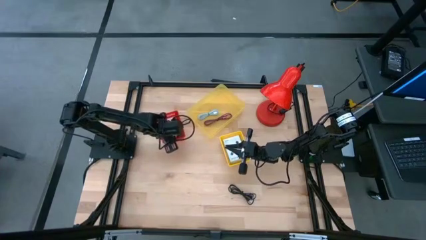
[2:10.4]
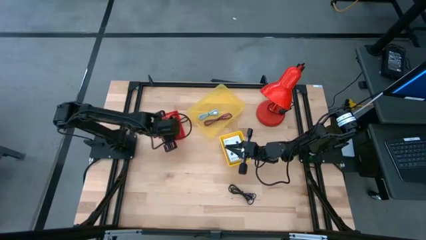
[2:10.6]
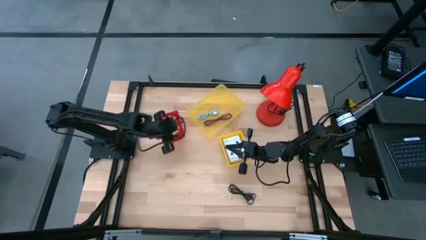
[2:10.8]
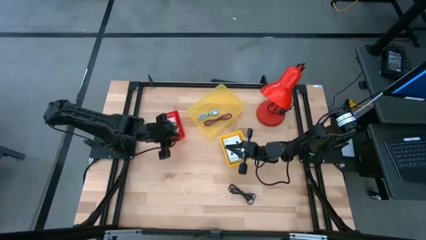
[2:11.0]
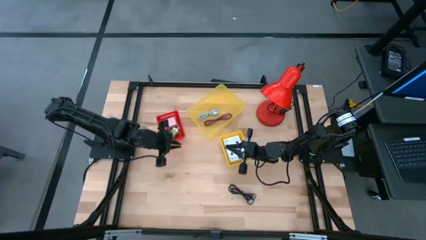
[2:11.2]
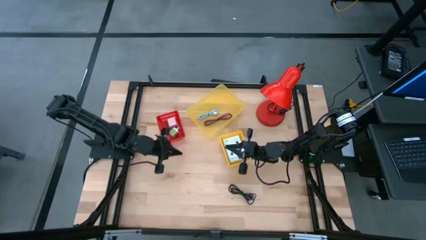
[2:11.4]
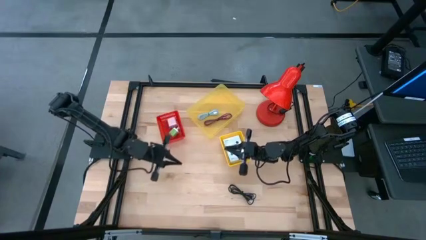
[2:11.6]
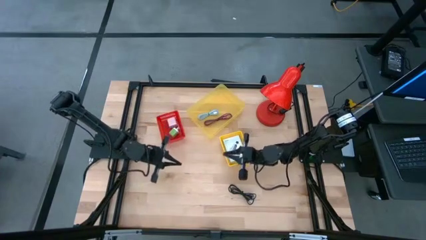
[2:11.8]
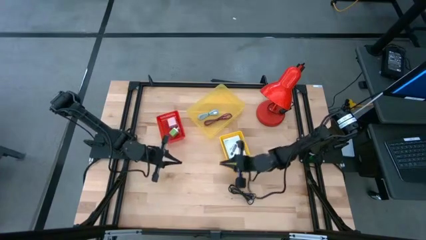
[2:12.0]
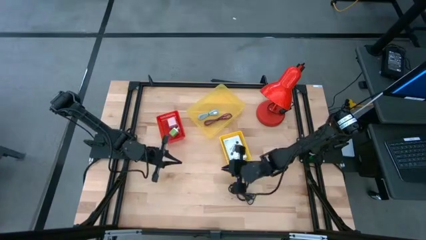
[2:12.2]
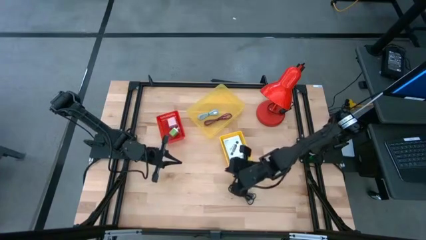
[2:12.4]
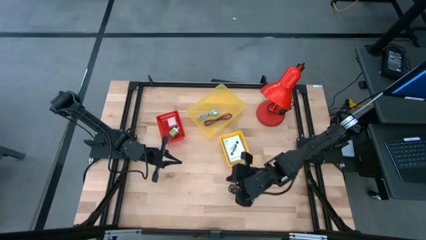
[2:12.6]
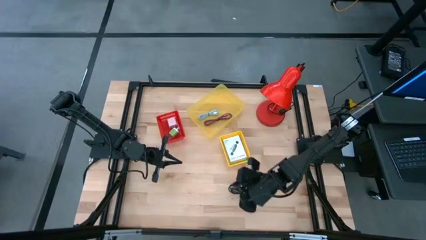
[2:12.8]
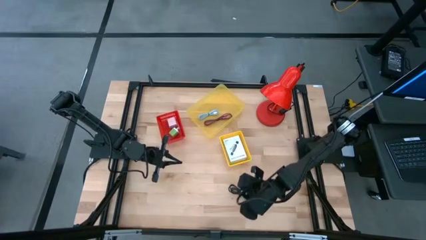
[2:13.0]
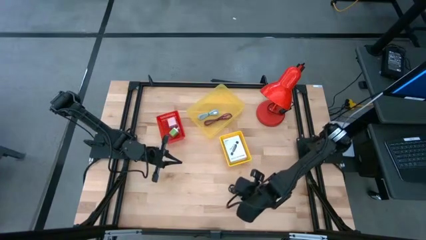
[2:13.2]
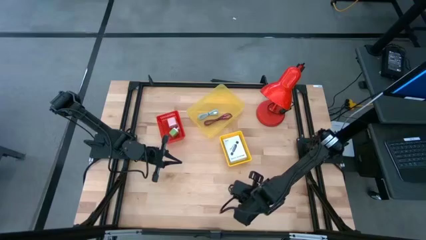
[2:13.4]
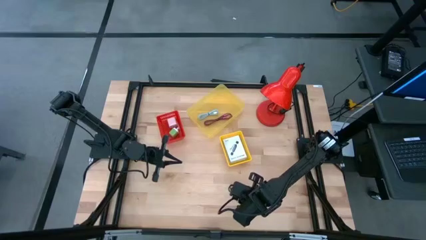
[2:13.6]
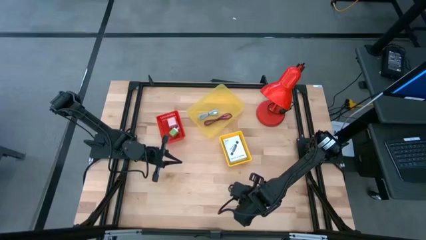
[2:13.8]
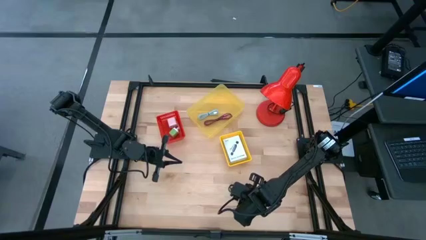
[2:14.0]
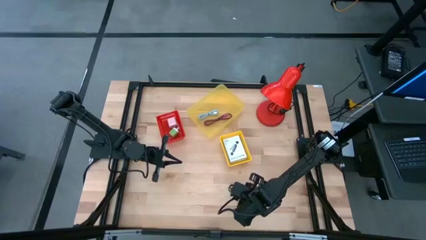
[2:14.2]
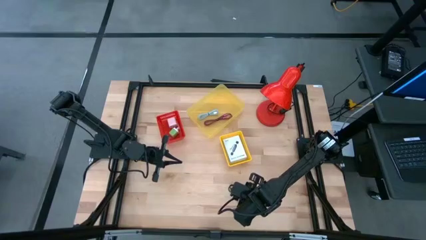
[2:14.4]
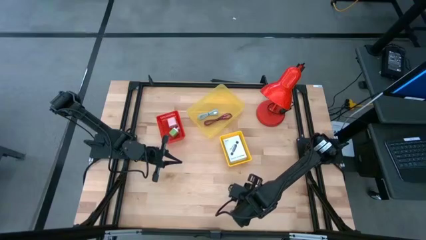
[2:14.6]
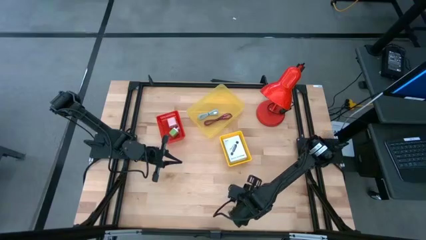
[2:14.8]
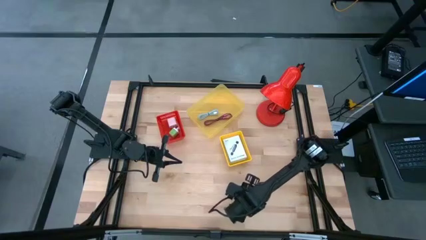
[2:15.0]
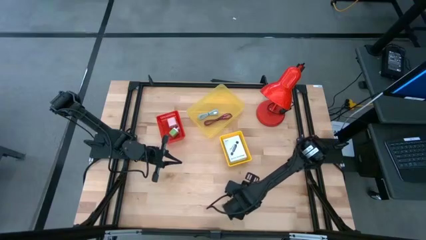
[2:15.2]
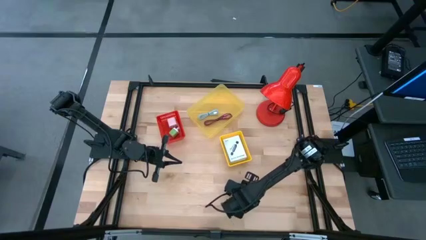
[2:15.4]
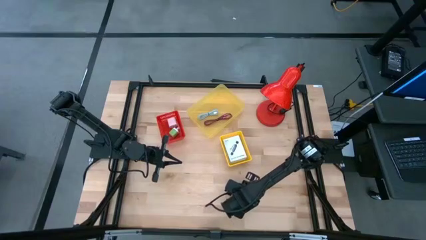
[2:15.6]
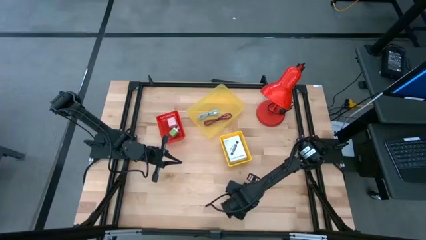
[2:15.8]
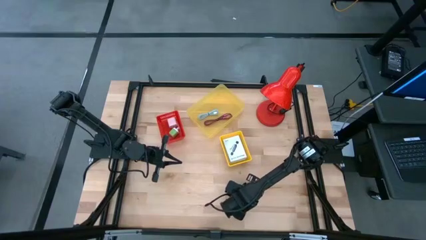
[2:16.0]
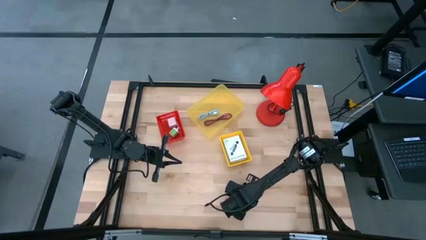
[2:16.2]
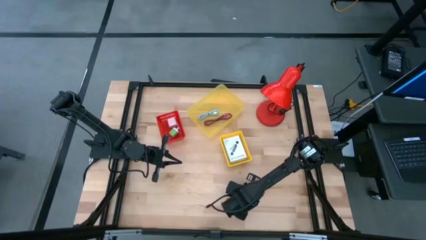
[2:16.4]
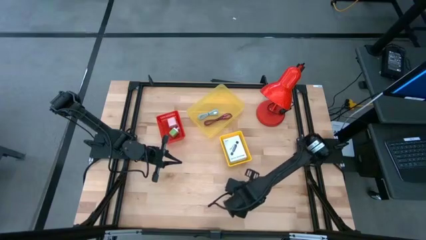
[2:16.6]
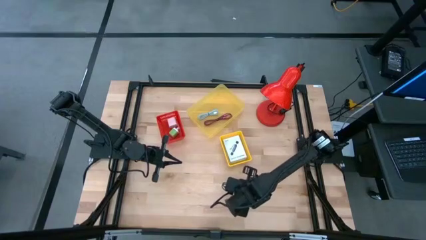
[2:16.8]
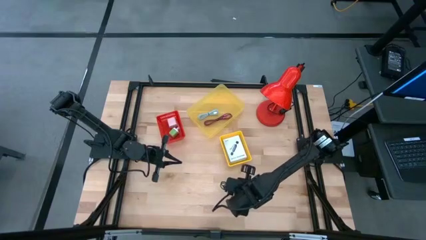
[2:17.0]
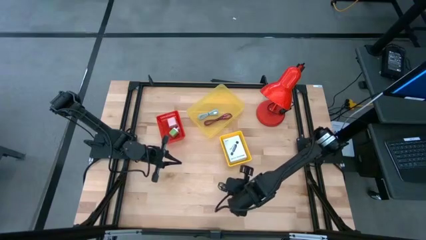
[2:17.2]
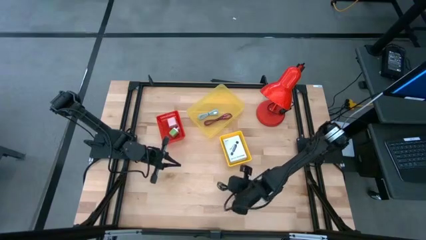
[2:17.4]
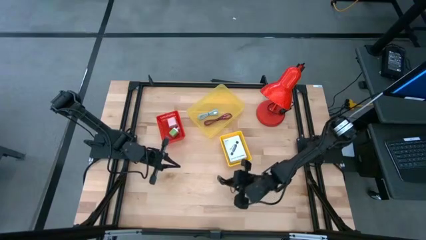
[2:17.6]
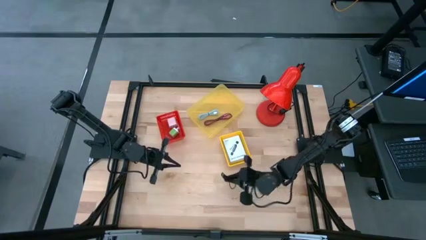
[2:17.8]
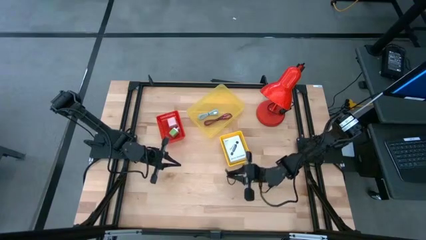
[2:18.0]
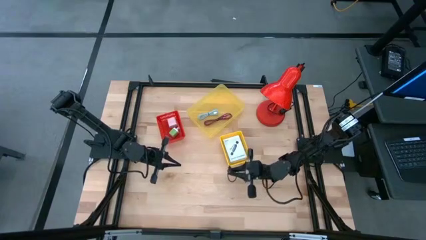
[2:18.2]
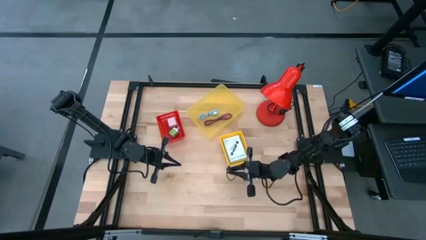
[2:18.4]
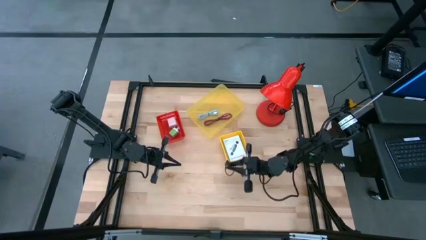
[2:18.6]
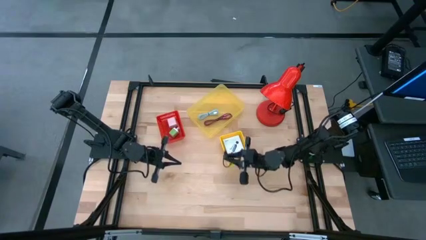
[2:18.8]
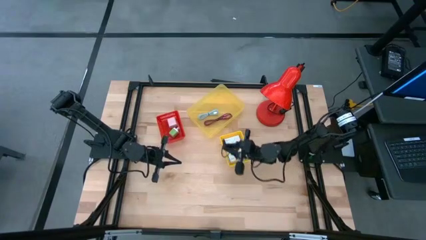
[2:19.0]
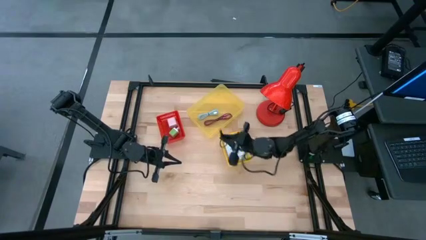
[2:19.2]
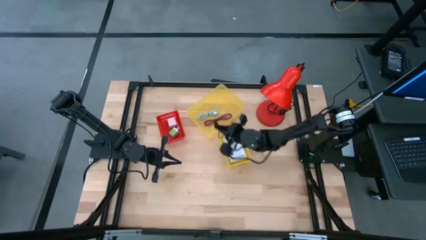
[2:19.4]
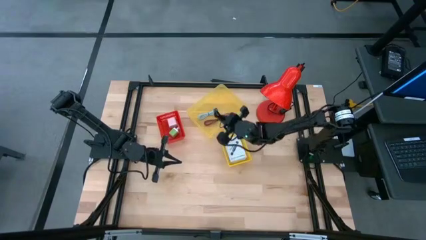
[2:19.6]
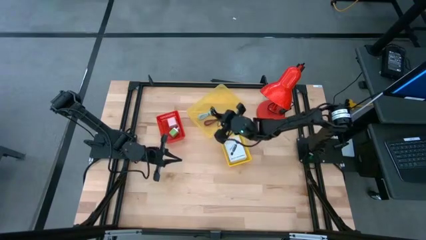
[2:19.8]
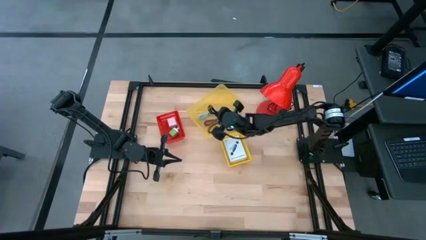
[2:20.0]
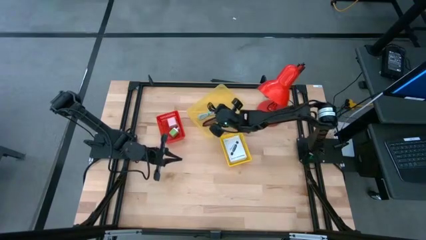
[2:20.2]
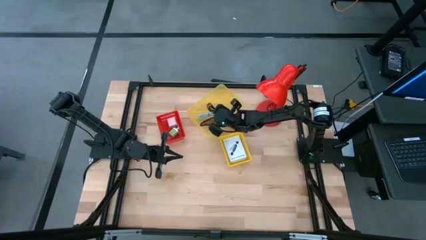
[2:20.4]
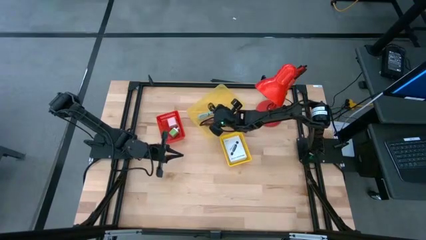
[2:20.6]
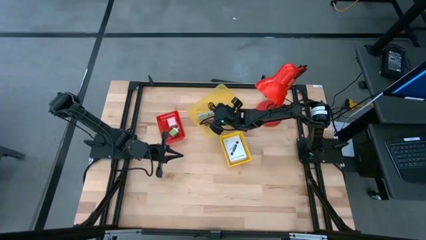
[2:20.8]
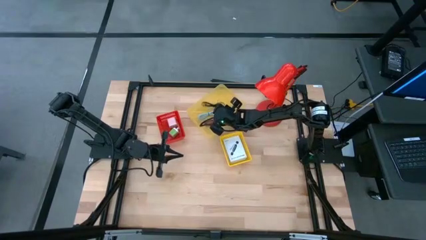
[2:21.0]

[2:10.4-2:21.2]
Task: Pick and place items into bin
Put the black charger cable into the big yellow bin

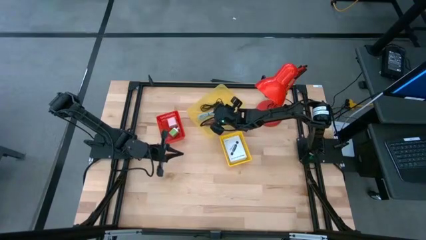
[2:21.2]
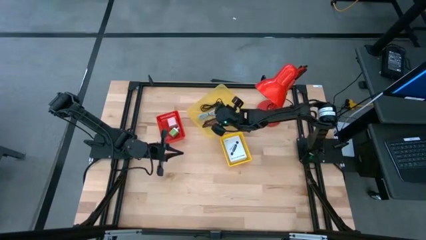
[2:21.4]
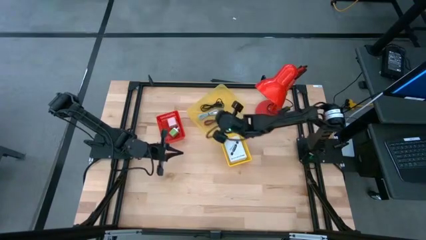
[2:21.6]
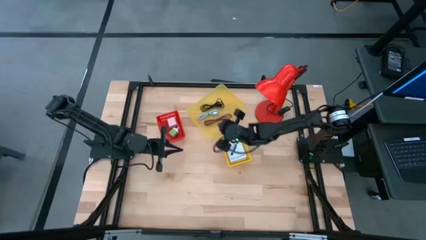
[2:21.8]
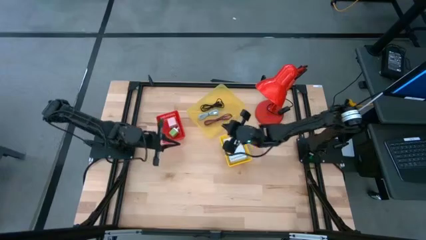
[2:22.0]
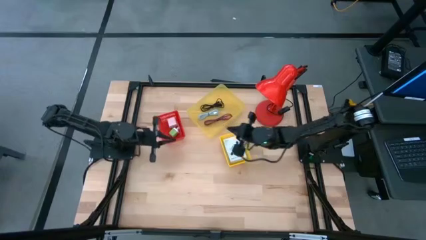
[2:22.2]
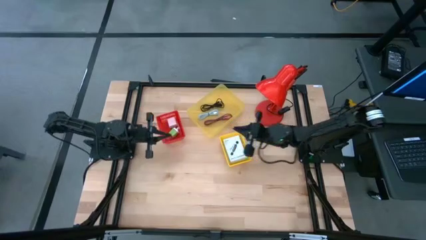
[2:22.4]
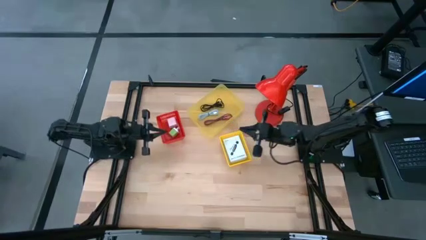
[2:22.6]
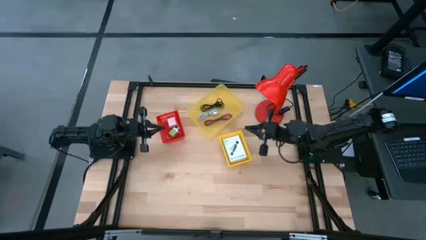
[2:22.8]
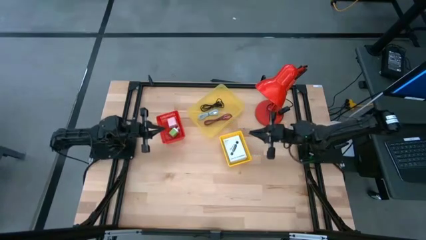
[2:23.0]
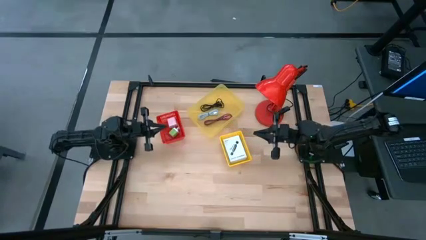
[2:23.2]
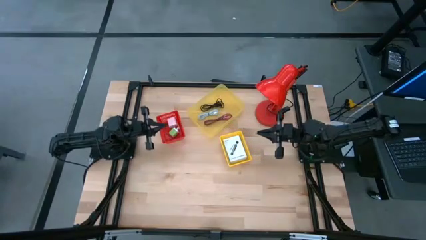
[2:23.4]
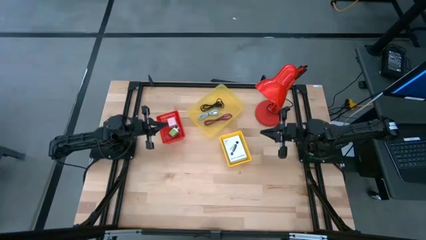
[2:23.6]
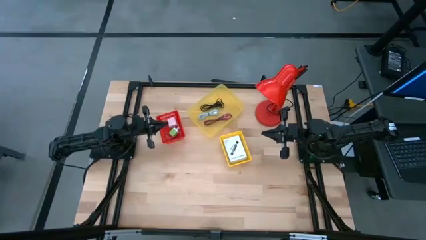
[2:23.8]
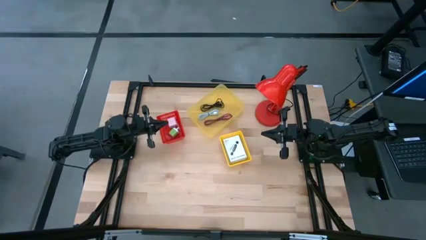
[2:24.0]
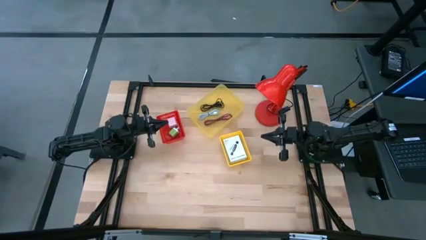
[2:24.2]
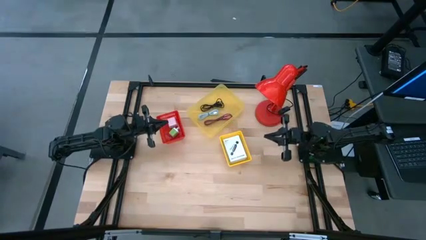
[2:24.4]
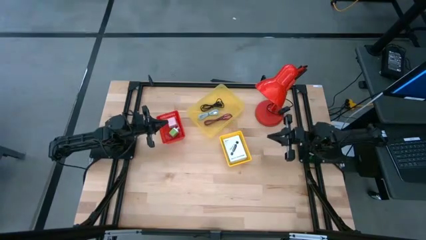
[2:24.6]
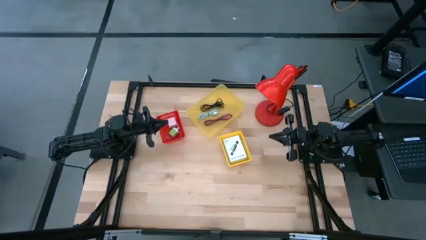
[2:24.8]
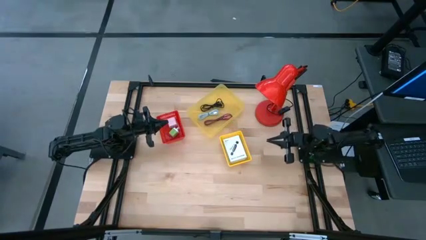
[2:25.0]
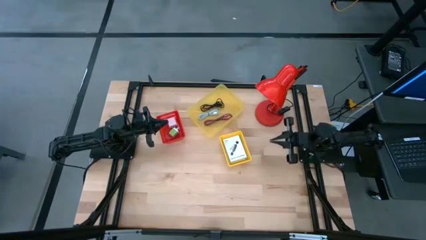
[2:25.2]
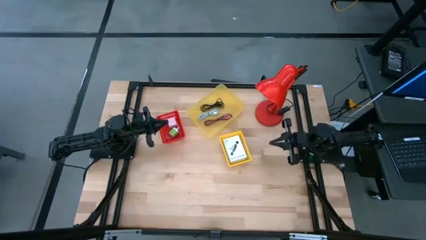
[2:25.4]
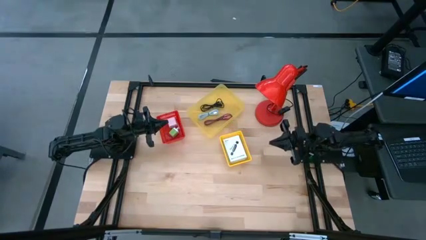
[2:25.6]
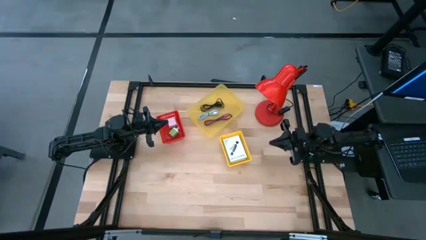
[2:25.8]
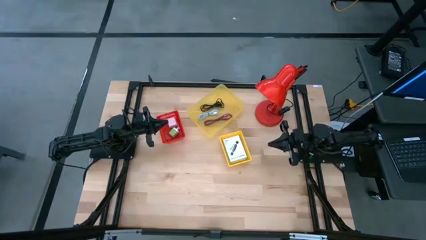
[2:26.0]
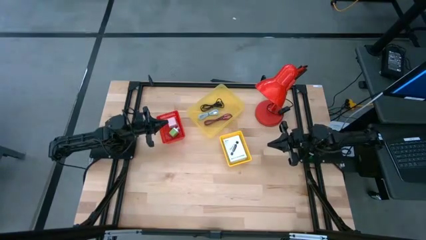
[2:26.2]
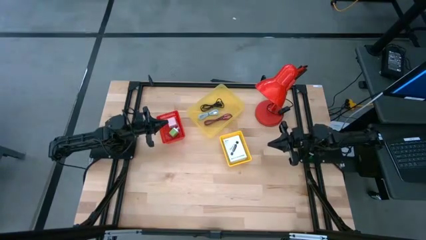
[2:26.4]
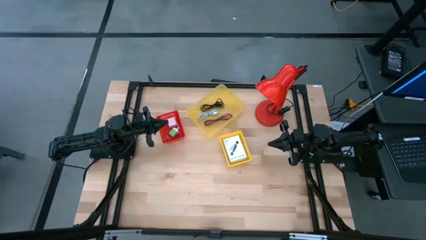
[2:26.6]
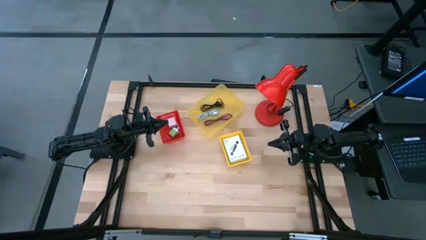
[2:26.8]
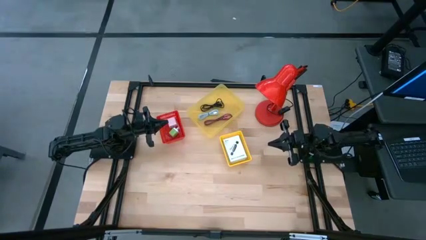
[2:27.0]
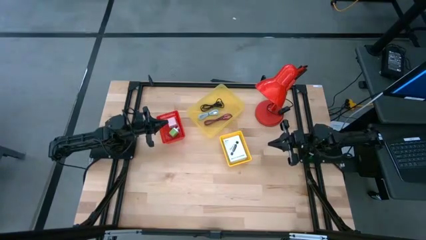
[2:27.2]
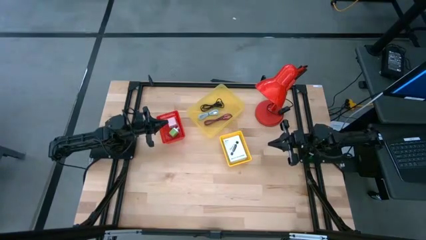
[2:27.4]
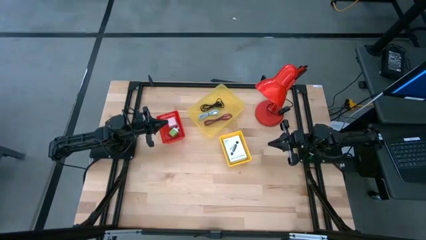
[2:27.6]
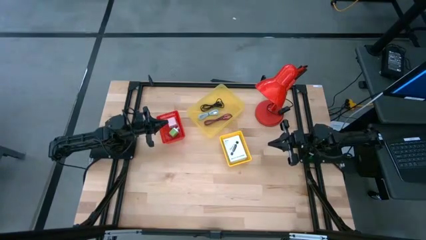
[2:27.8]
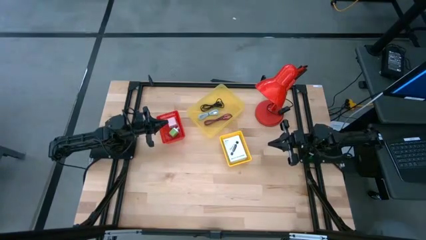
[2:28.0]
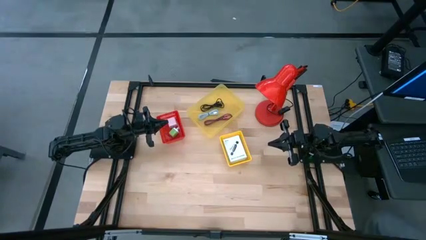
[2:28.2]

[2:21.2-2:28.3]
Return to Home Position
